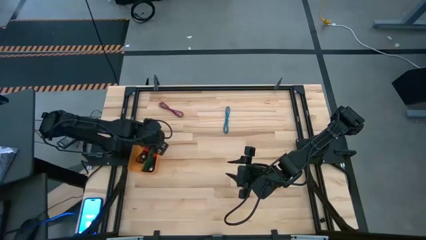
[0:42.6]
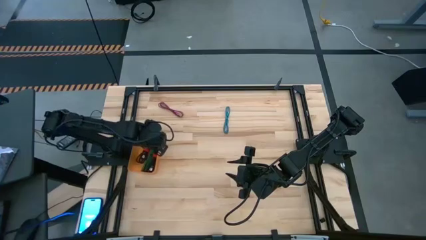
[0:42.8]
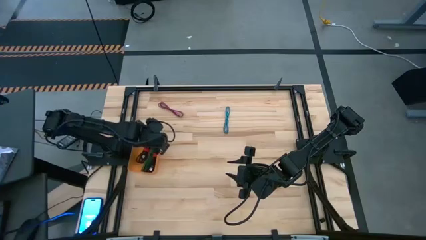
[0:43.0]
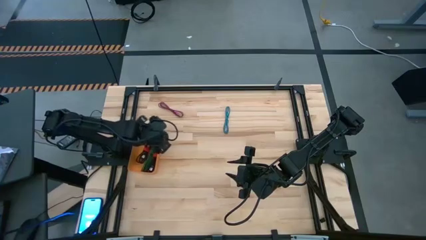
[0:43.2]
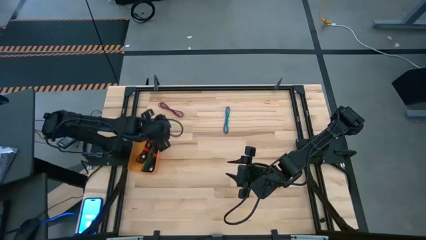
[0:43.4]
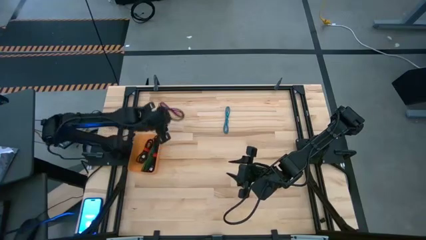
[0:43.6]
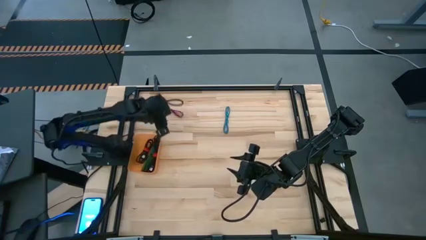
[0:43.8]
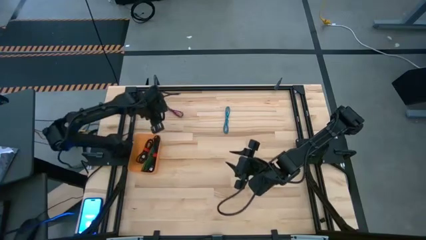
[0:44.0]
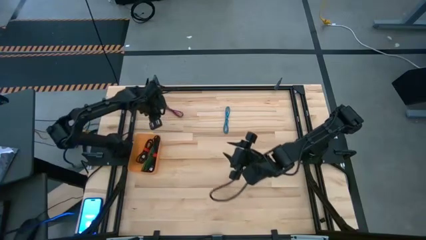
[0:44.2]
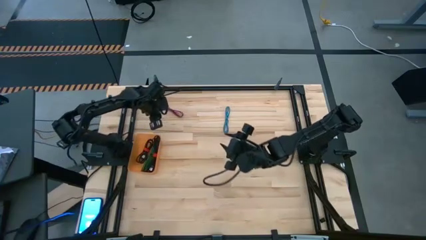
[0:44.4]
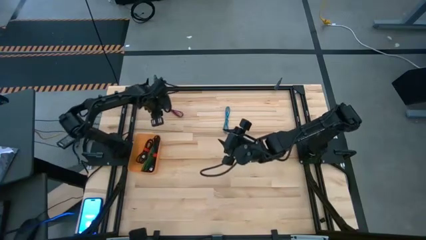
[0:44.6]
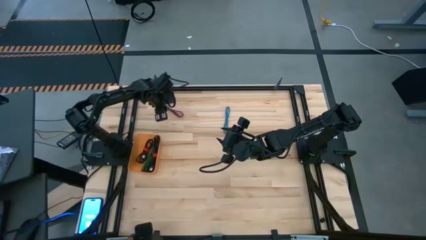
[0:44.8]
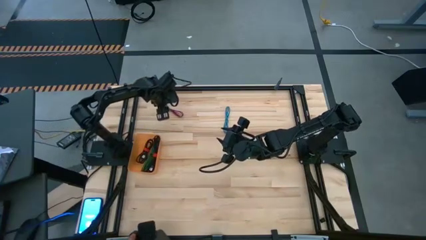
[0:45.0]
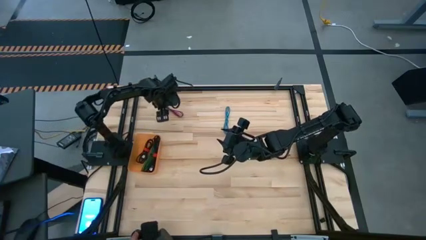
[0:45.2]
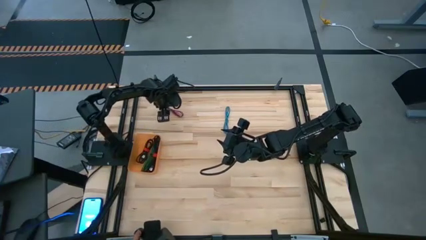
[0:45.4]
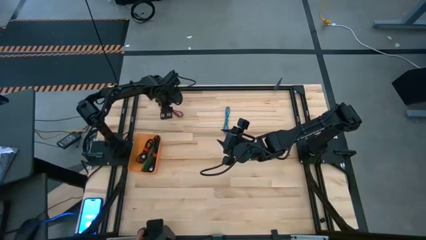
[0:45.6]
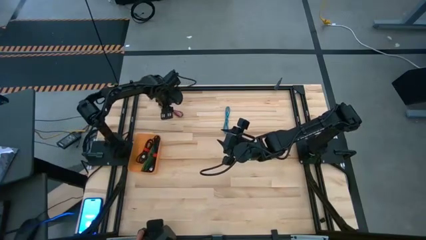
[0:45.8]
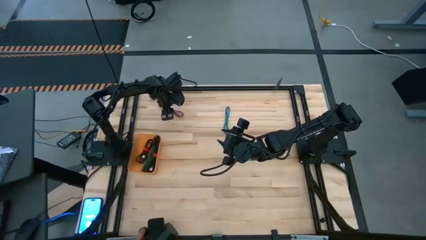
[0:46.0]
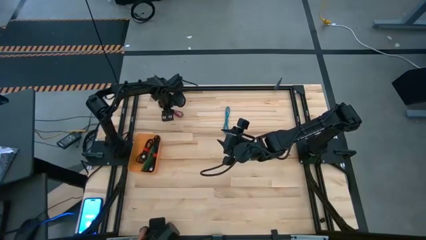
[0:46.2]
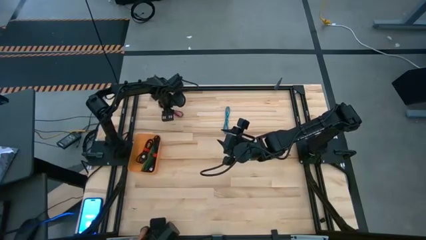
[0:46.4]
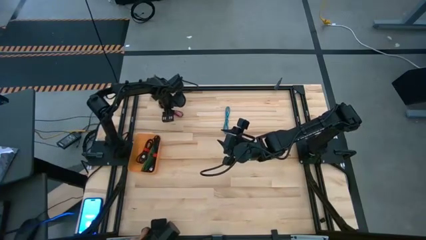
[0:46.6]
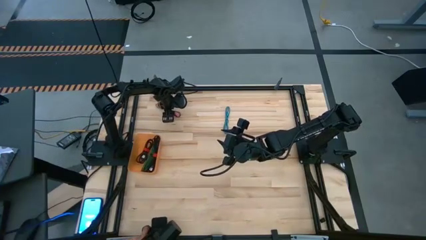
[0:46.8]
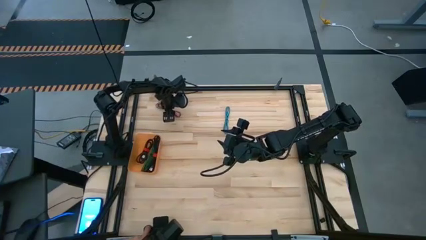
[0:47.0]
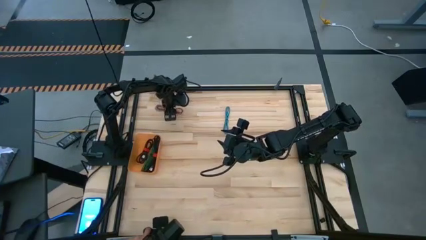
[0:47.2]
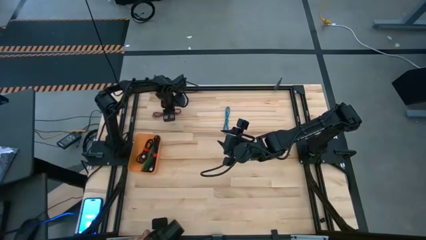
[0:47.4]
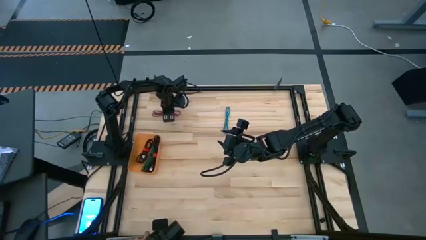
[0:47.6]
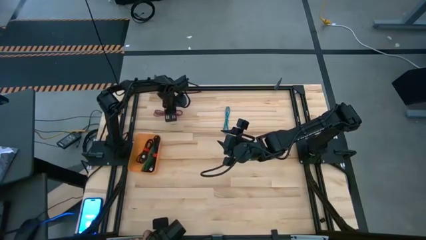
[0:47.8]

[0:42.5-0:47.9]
Task: Pick and place USB-C Cables
Put the pink USB cable into the orange bin

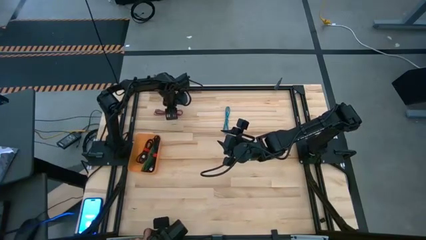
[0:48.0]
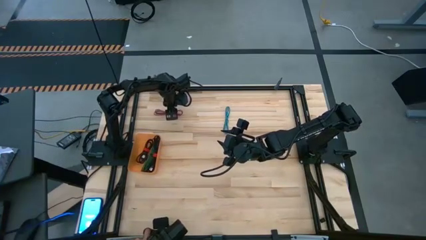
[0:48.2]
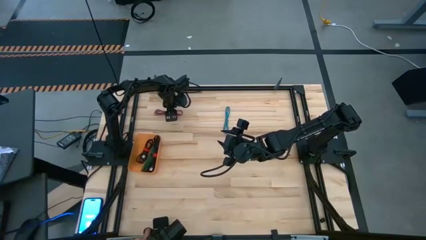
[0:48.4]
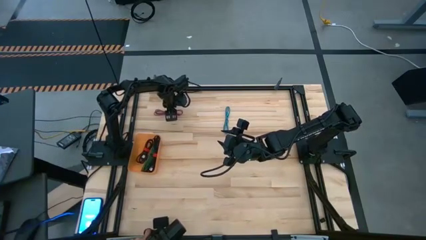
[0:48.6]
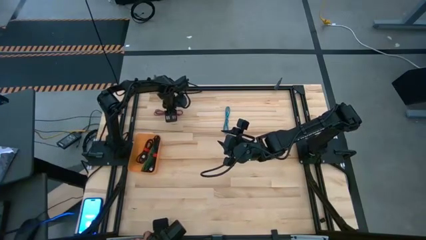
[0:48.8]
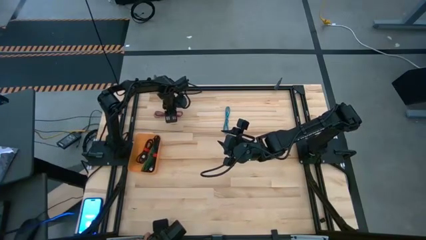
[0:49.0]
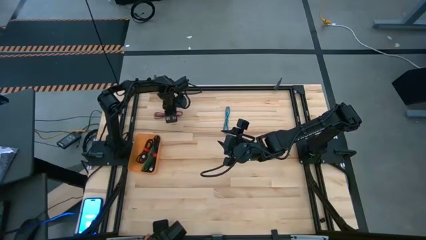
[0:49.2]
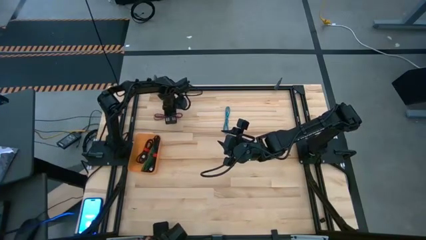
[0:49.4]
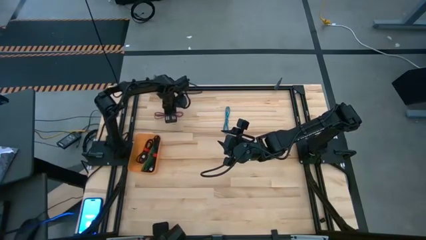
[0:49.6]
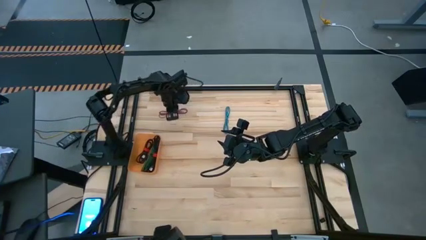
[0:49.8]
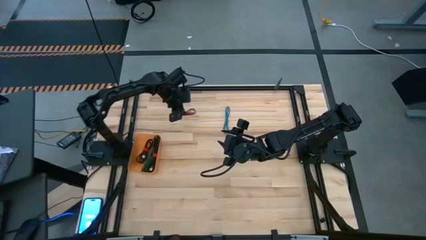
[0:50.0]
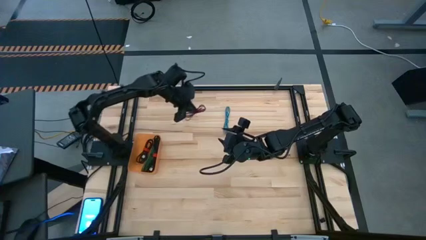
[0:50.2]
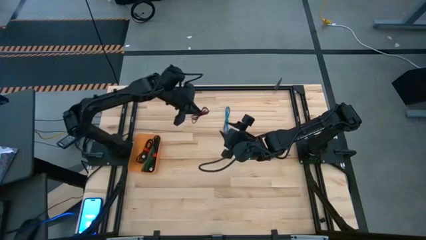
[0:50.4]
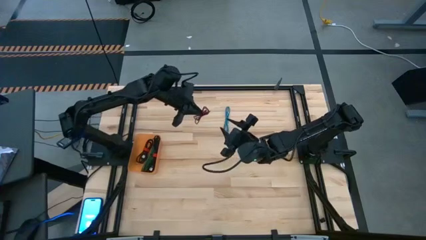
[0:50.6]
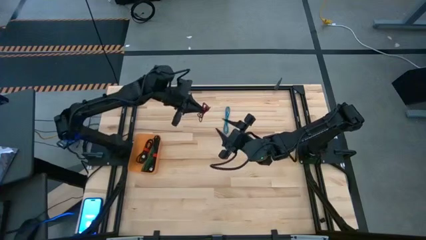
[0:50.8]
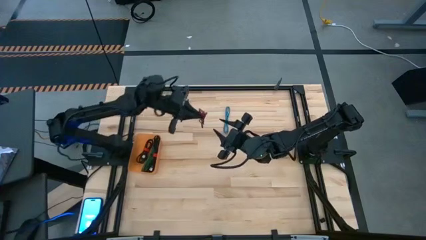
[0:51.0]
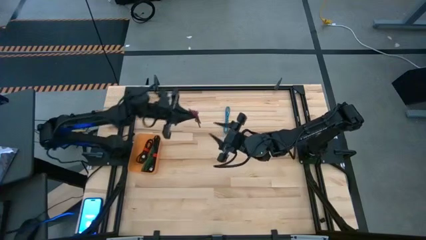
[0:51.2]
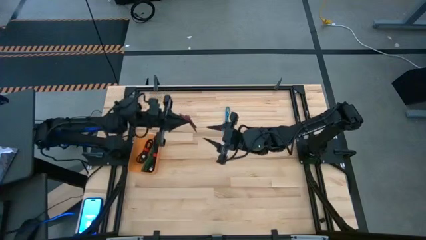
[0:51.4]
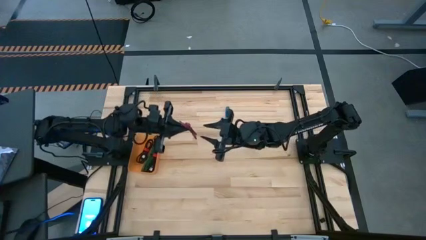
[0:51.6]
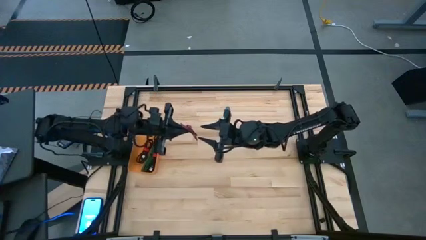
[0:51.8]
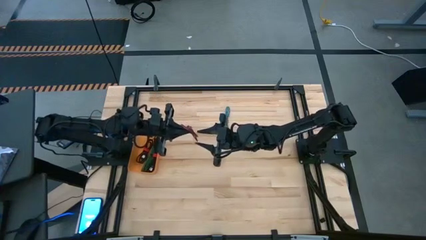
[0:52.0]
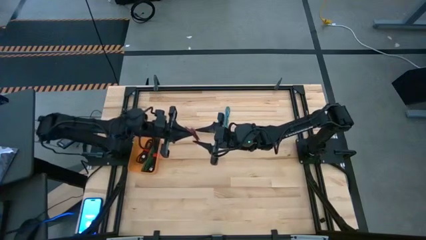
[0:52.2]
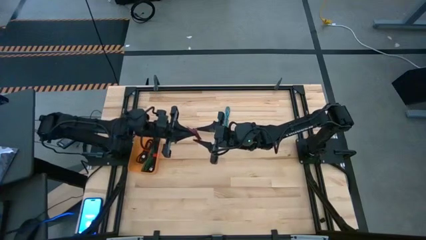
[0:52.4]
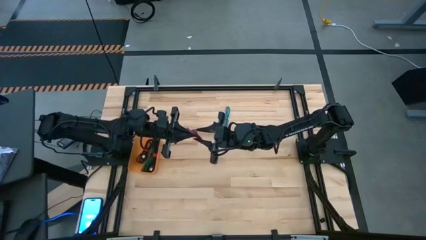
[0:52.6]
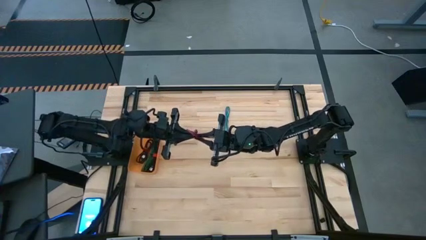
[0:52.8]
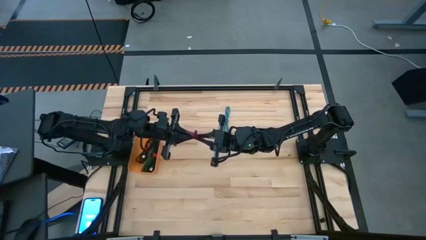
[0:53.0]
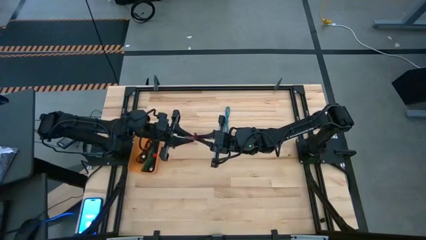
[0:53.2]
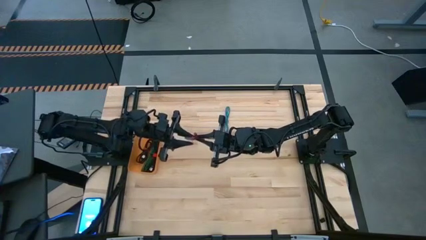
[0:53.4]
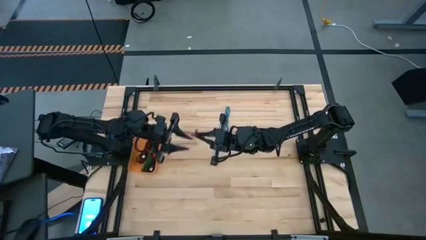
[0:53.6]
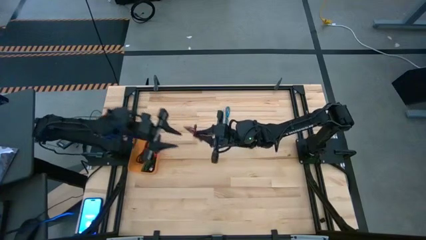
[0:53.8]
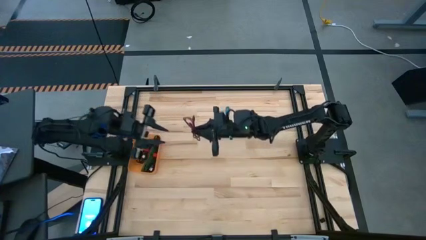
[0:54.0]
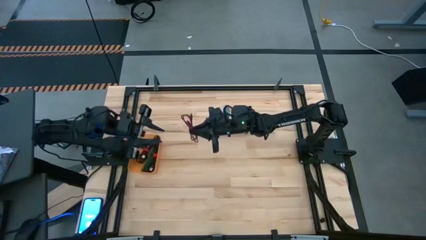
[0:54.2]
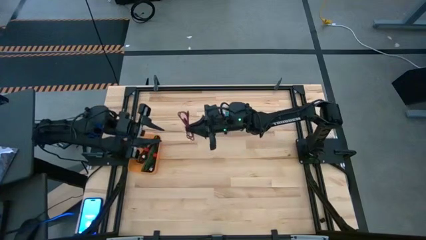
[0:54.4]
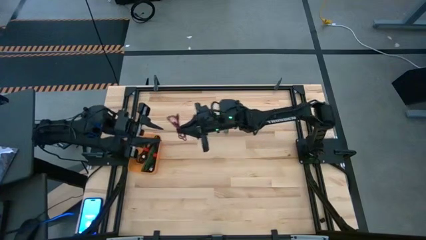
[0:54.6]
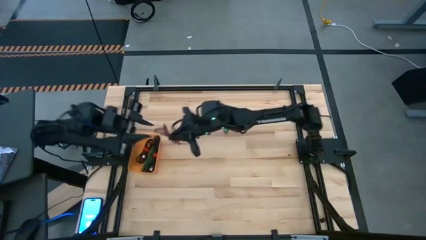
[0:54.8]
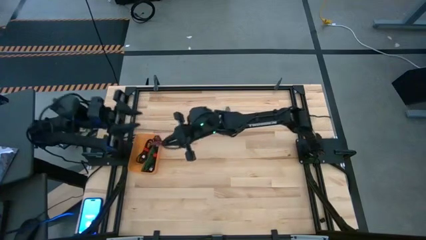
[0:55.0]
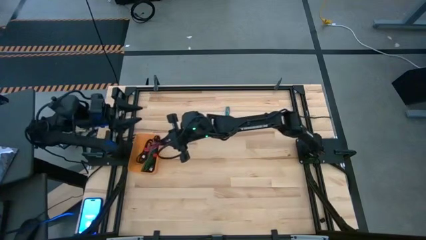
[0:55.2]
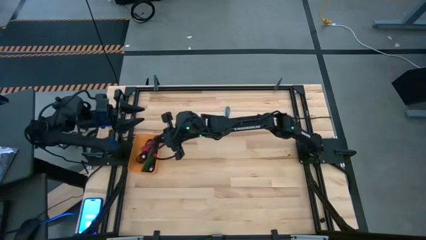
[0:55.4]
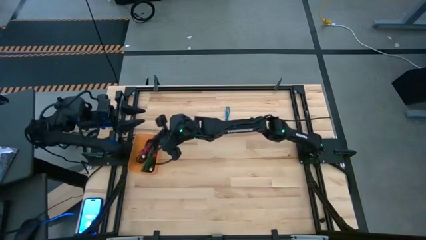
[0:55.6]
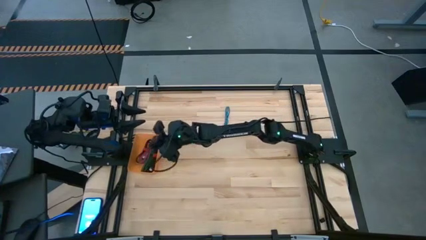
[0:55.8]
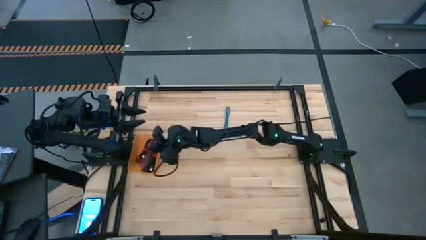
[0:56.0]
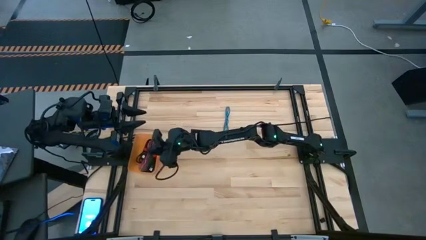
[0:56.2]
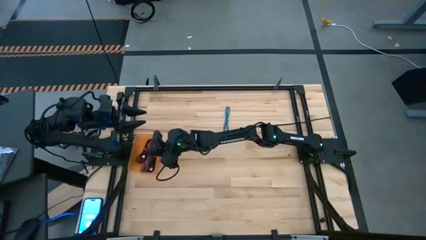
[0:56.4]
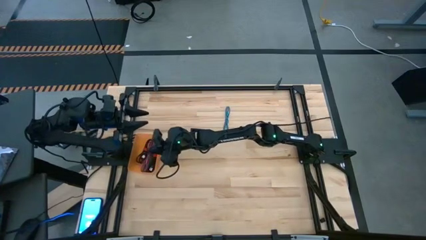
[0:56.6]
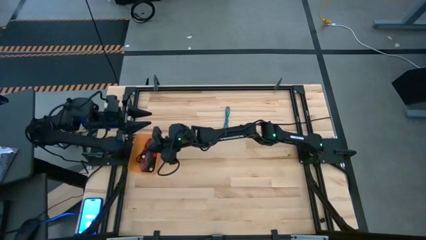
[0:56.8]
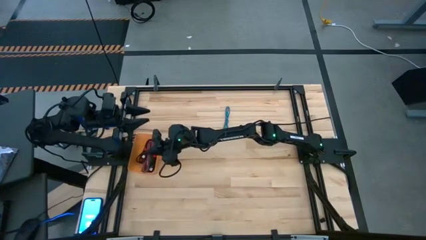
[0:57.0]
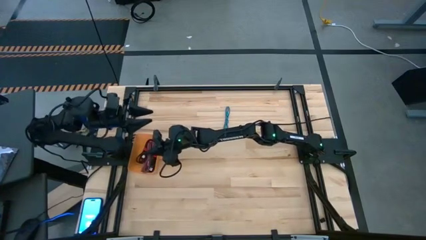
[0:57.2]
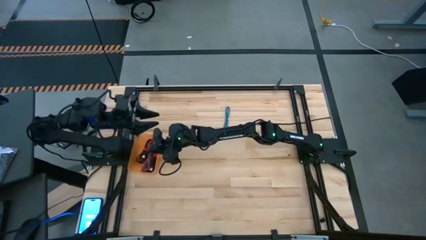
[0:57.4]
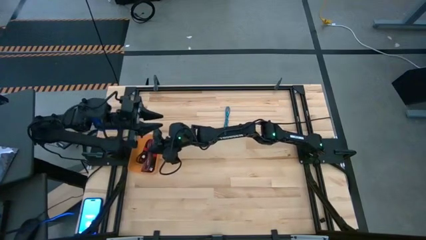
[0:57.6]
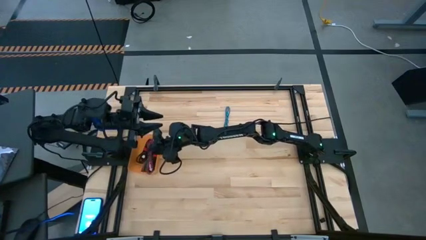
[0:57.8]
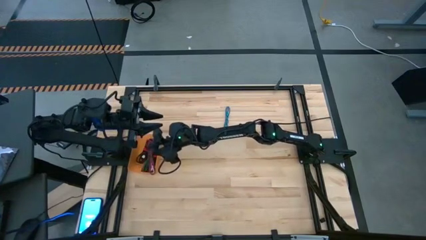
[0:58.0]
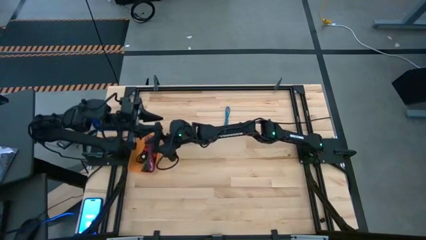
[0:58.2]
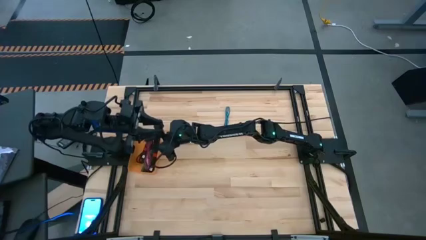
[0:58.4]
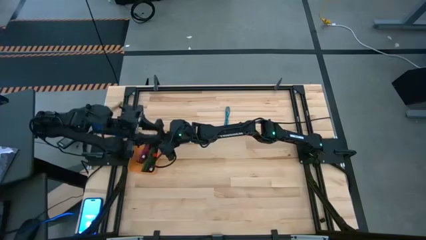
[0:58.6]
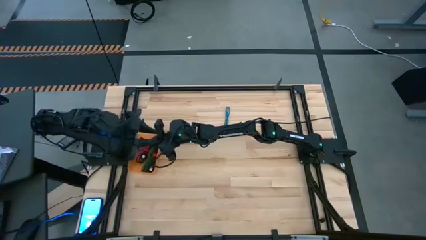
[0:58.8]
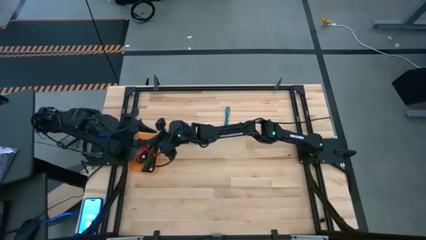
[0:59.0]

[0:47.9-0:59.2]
Put the pink USB cable into the orange bin
